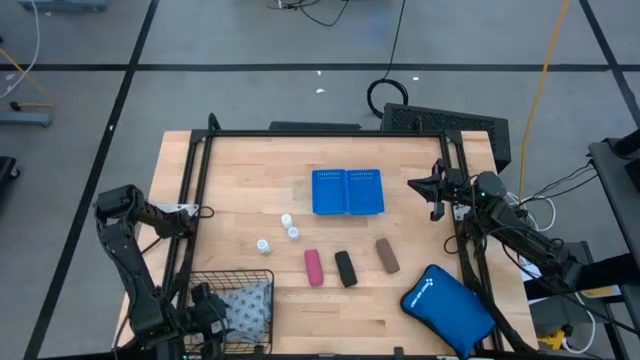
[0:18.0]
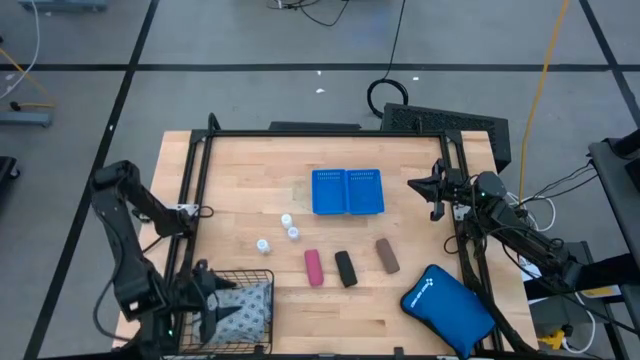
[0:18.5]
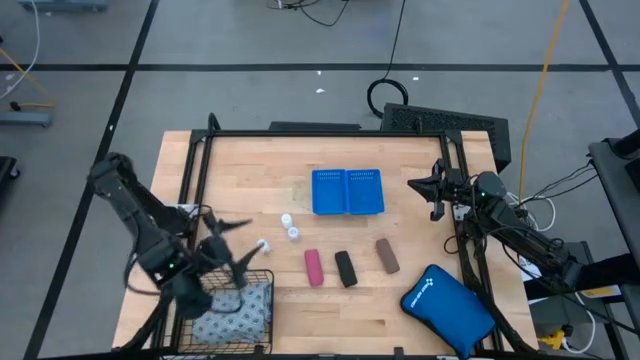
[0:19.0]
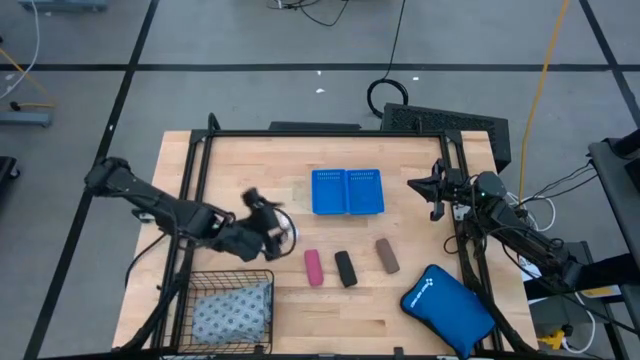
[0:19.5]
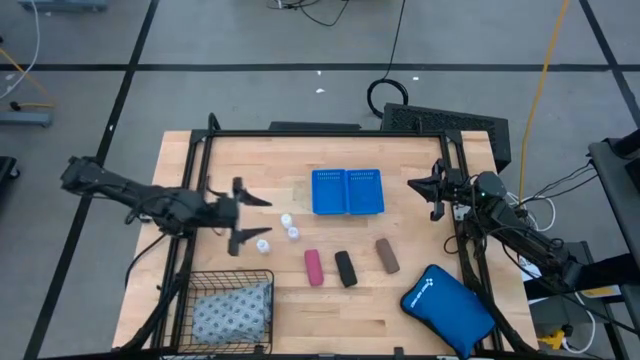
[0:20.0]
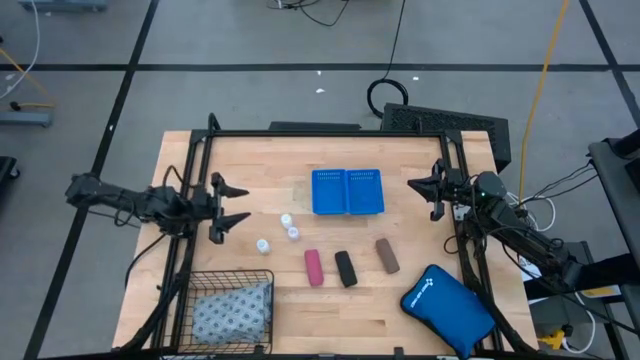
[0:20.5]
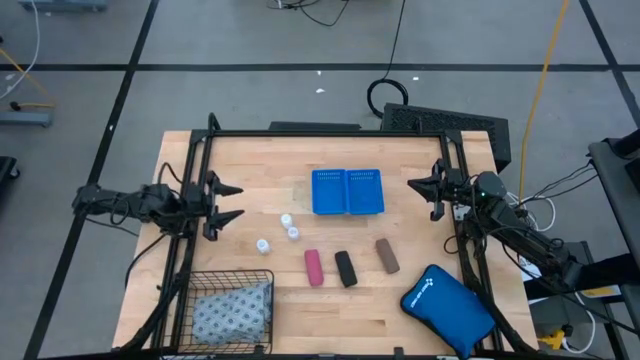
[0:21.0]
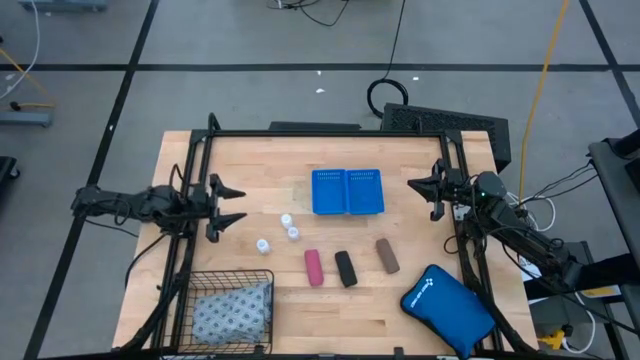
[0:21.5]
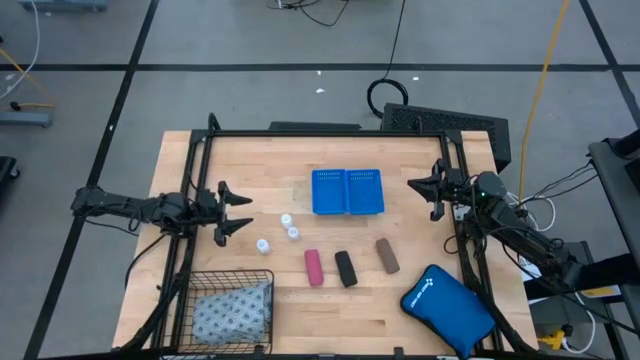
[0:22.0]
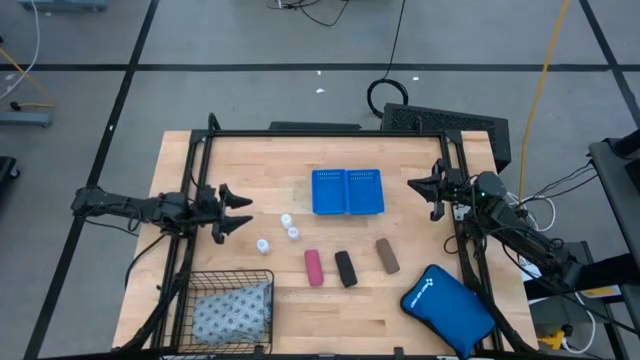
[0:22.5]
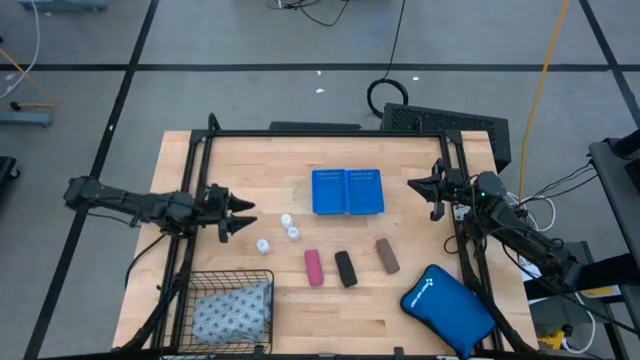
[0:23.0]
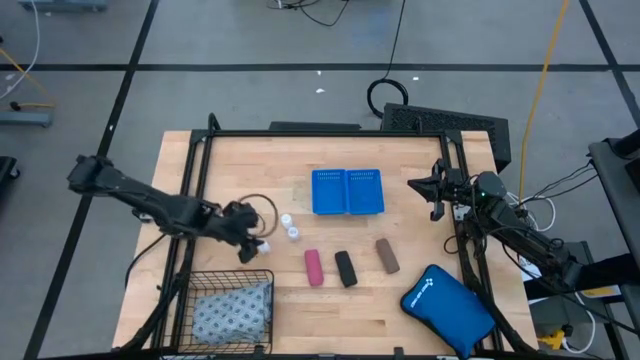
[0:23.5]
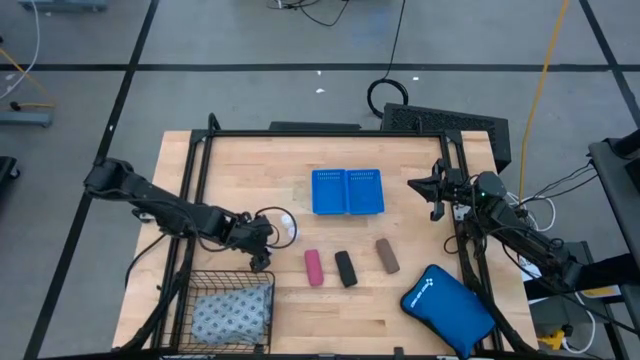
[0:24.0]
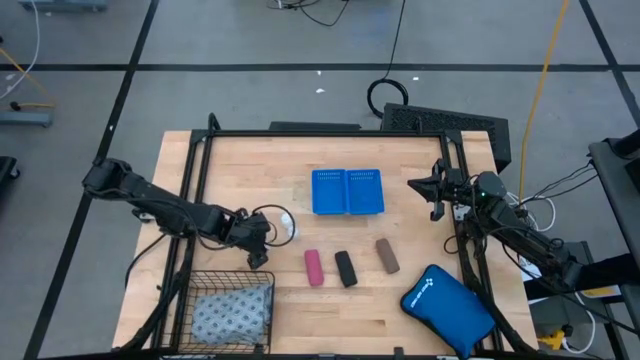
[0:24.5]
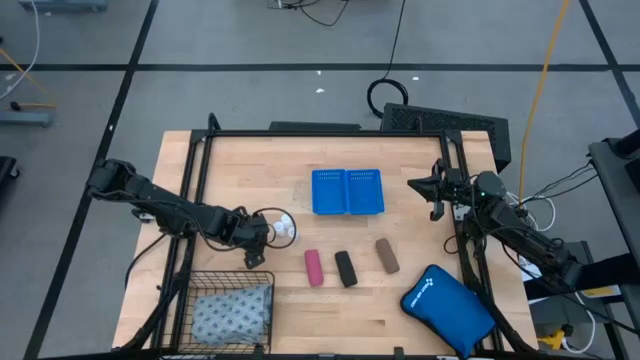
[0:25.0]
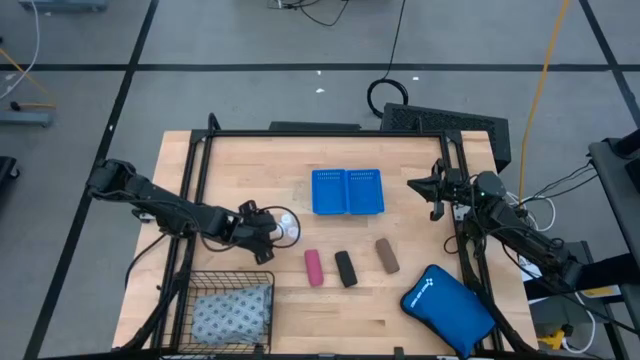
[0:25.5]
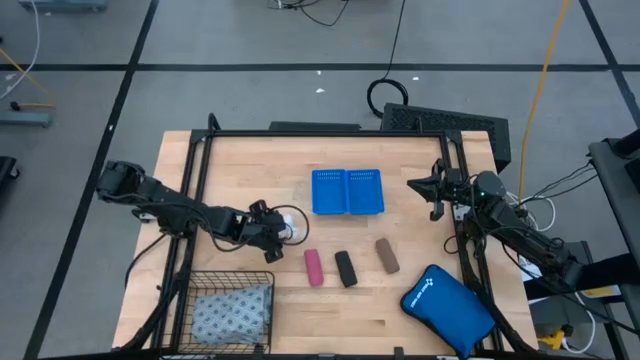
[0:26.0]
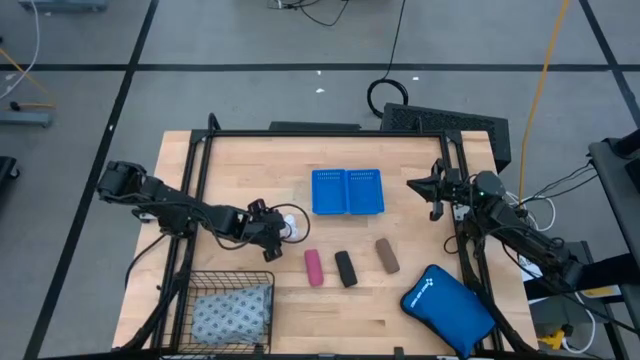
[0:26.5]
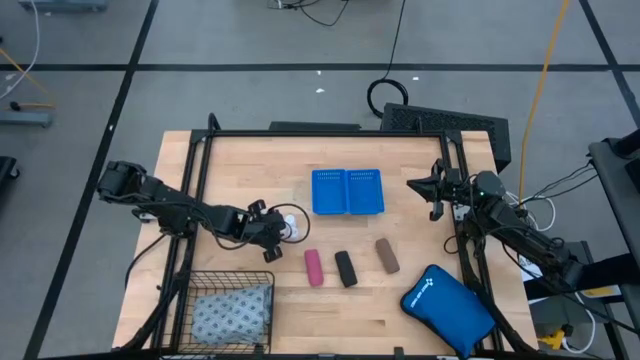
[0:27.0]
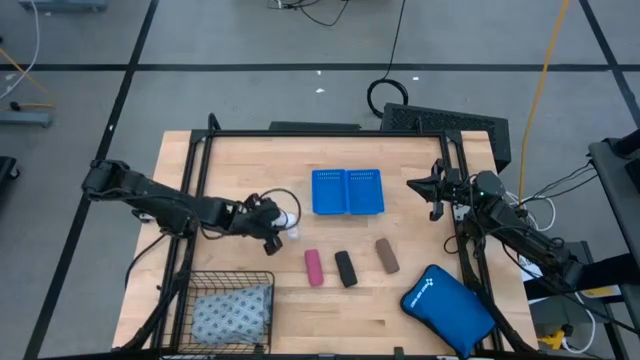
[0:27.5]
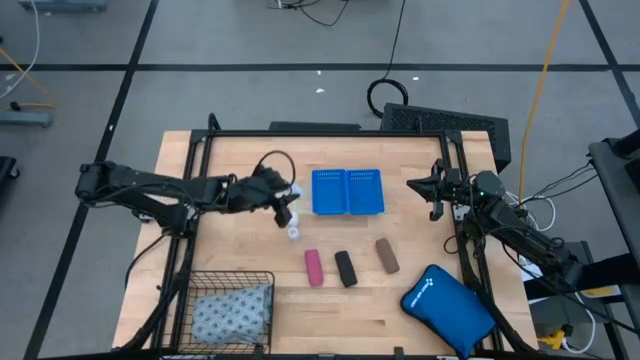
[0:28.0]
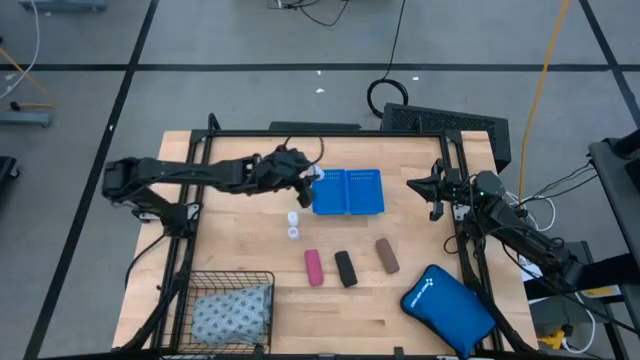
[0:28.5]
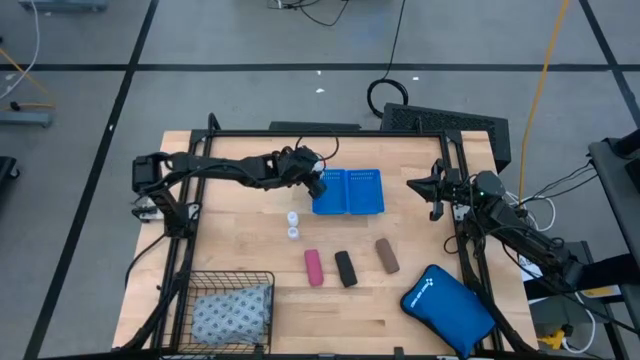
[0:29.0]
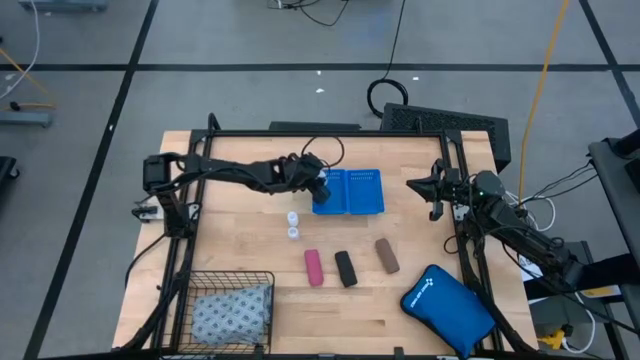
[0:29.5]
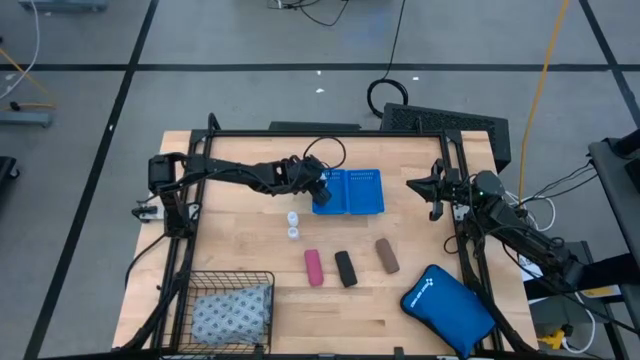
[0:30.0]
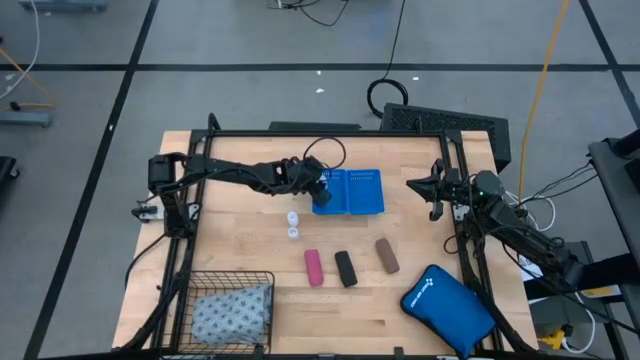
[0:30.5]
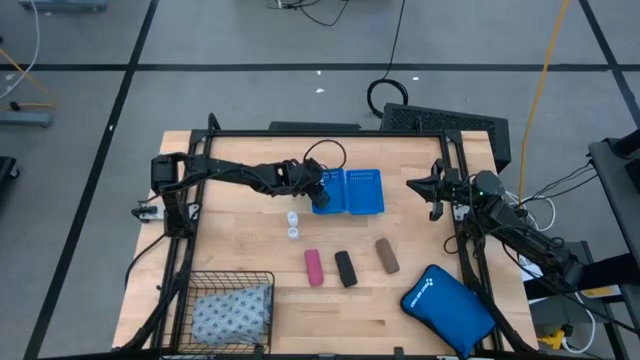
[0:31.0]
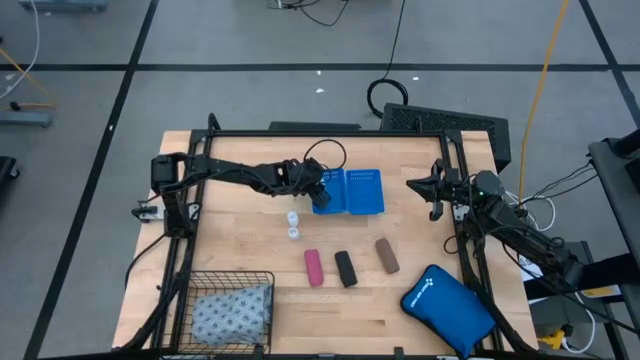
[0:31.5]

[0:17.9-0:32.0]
Task: Pick & place medical supplies in basket/bin
Put the bottom transparent pill bottle into the left blue bin

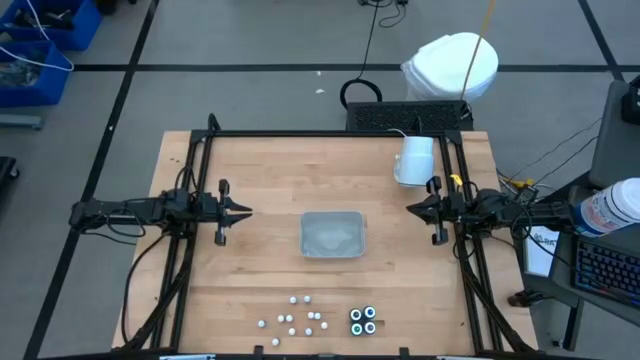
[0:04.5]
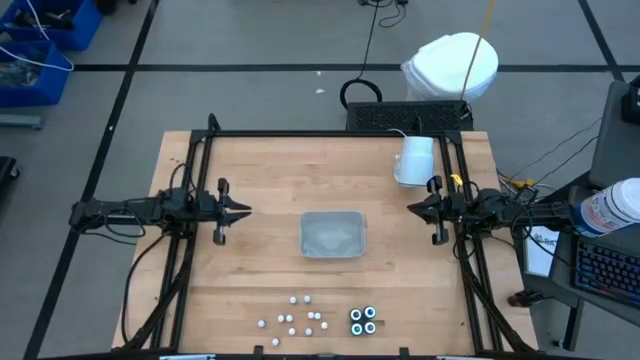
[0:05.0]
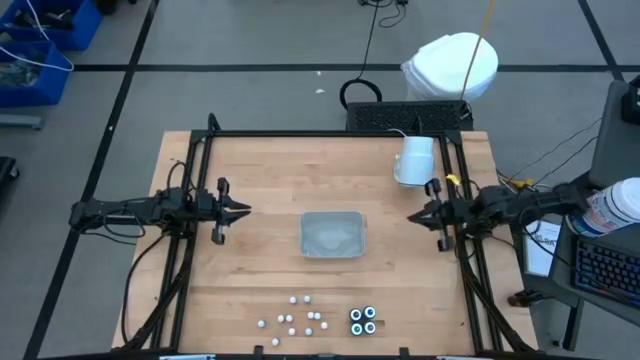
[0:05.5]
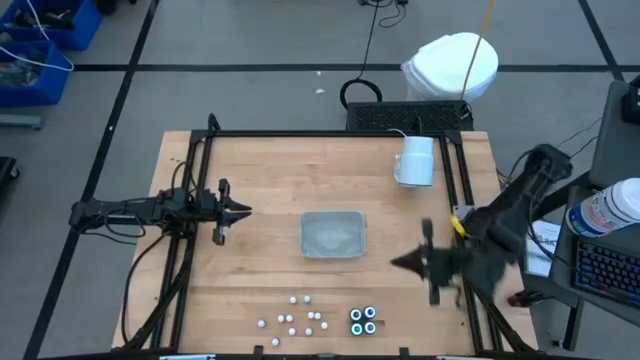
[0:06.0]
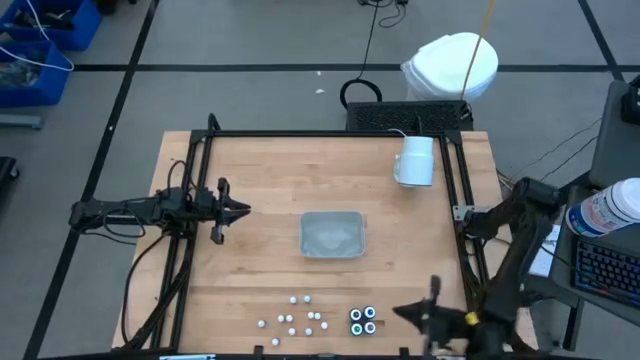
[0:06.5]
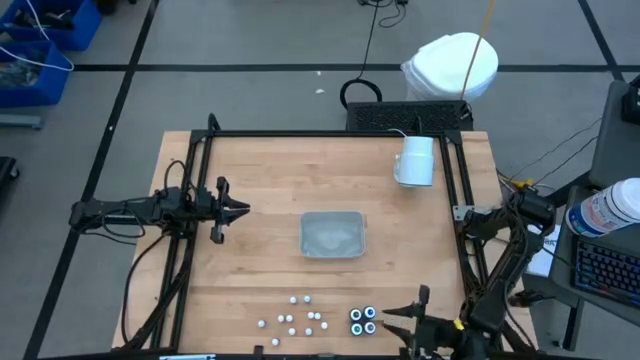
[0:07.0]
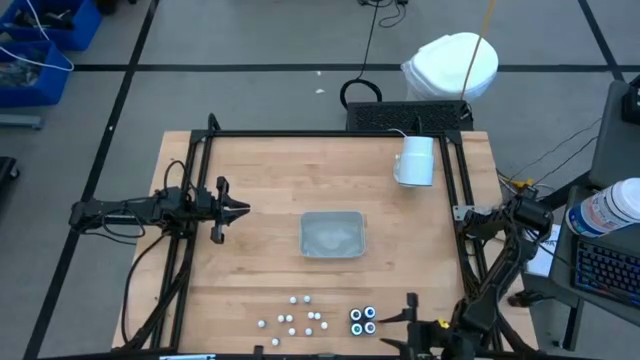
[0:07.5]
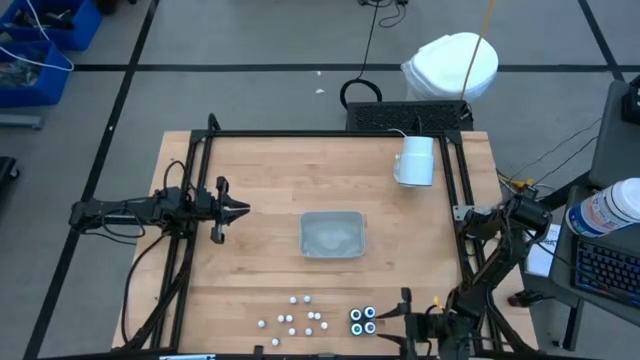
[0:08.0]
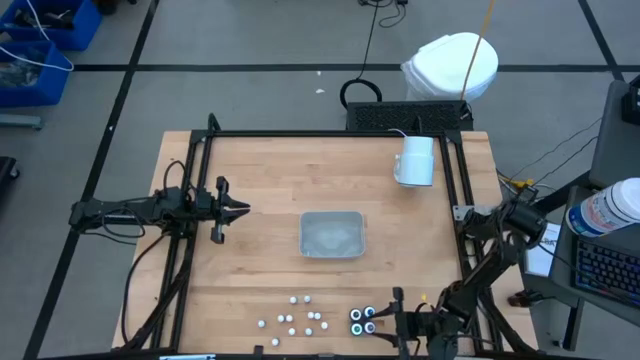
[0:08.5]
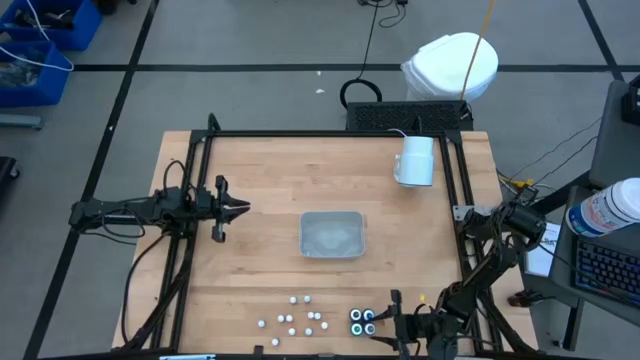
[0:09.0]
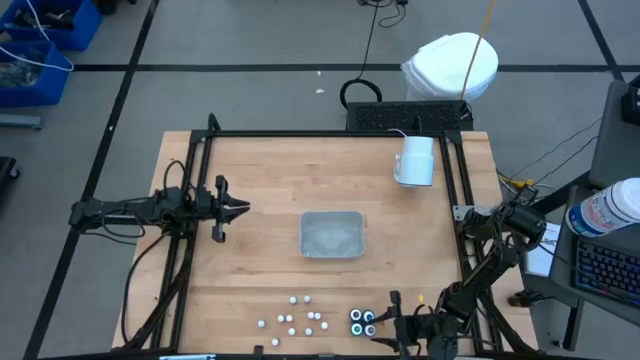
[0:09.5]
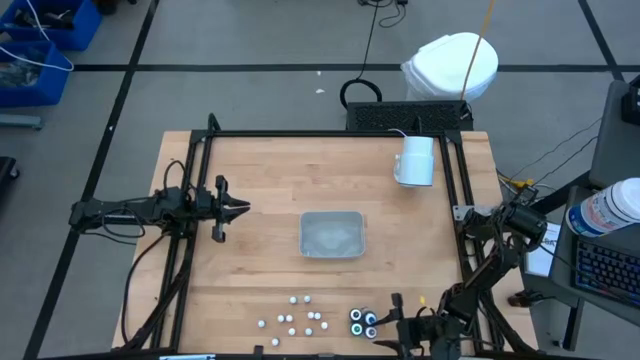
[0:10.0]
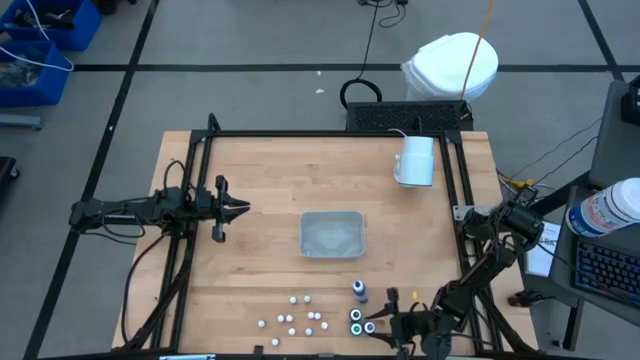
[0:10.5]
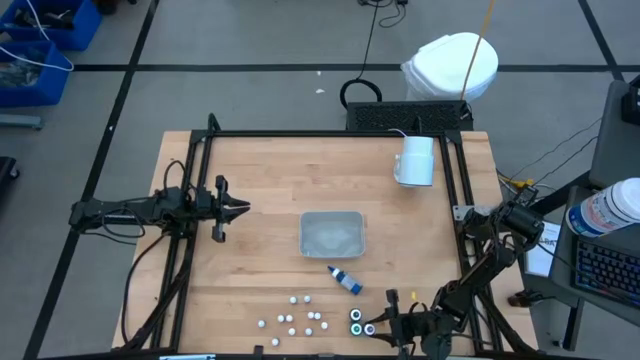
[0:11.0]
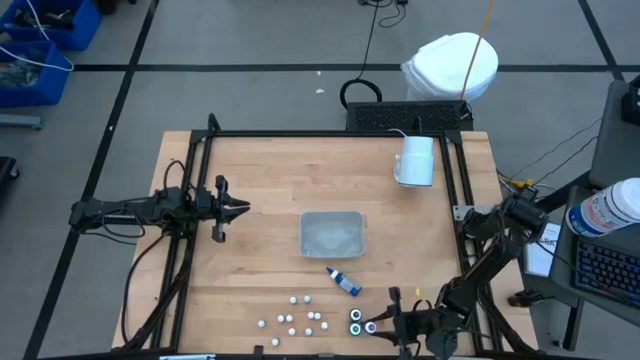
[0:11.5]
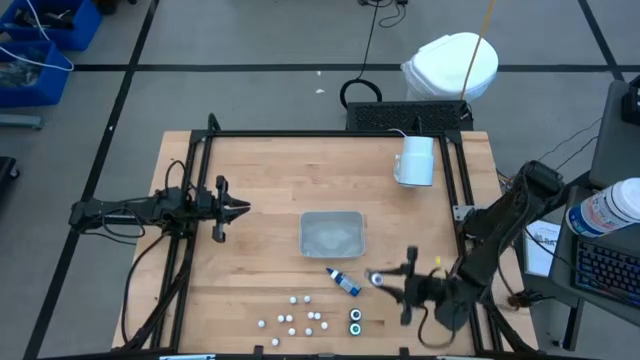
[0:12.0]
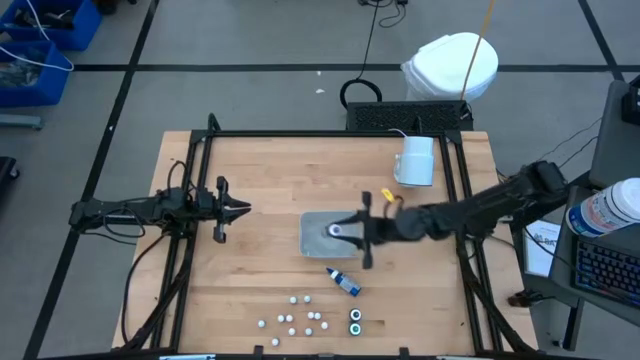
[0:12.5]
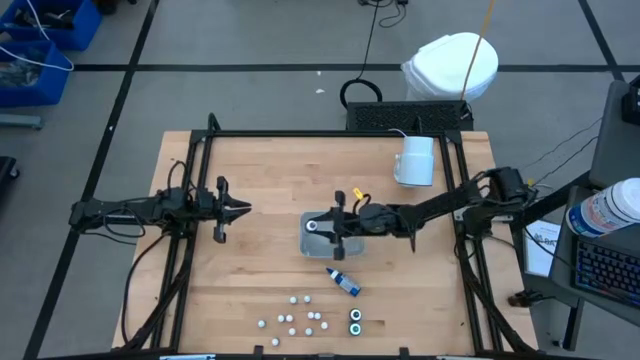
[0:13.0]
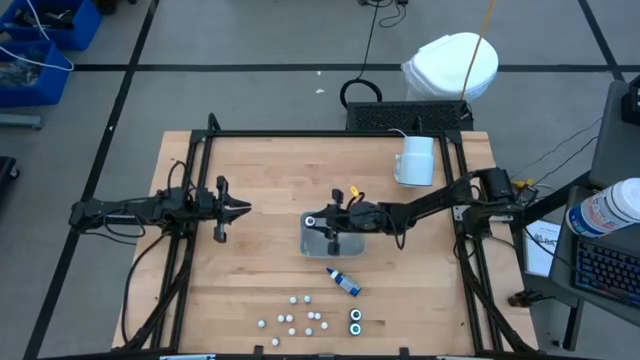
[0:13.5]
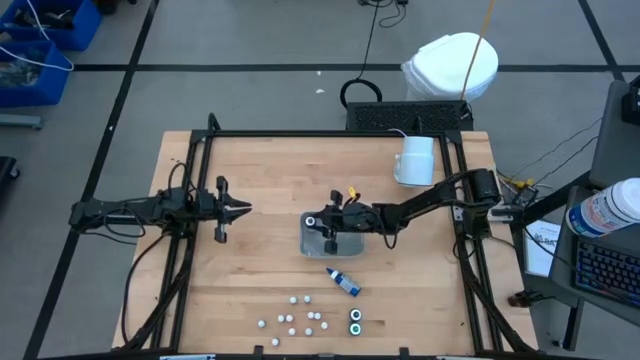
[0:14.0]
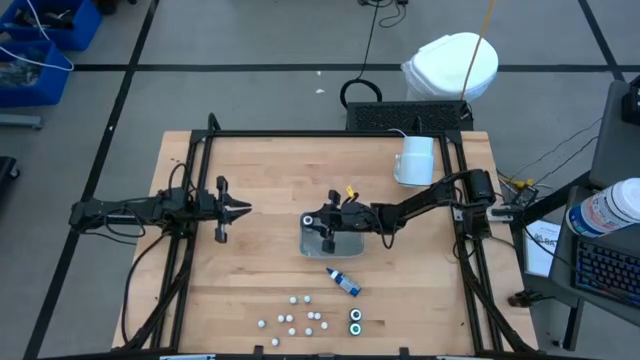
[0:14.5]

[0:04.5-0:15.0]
Task: Pick & Place food coloring
Put the big purple food coloring into the gray bin
